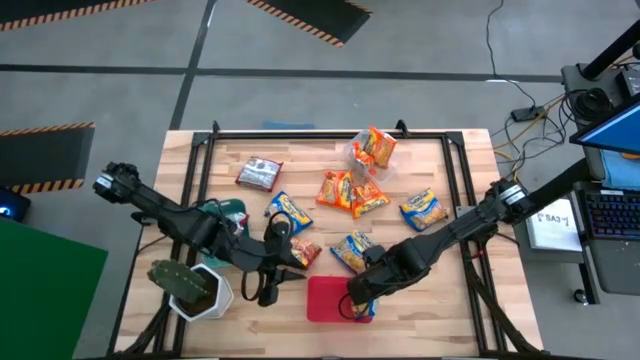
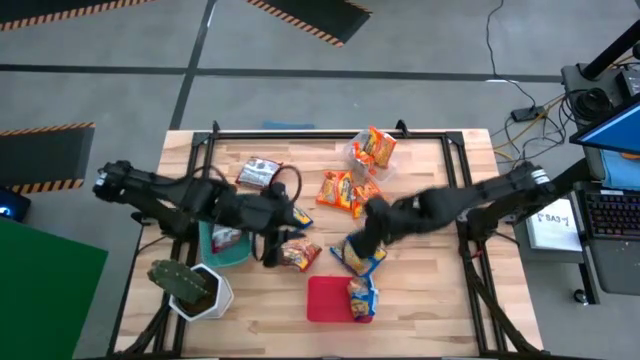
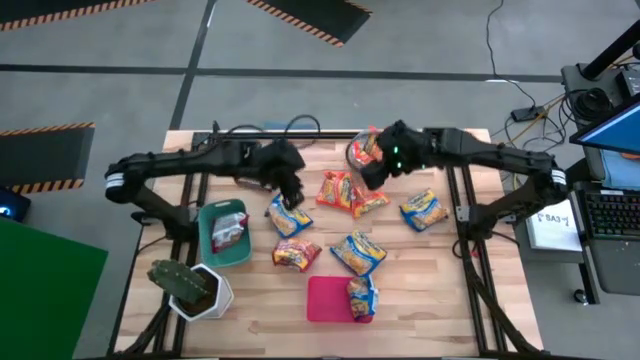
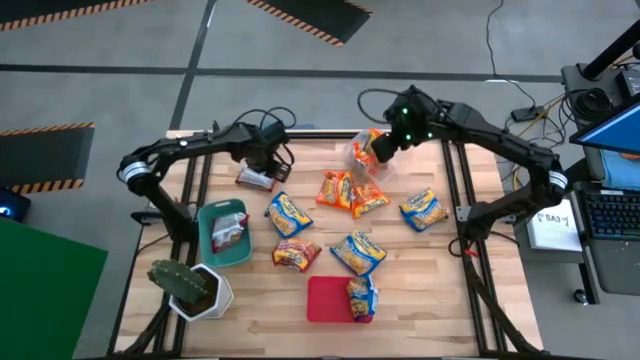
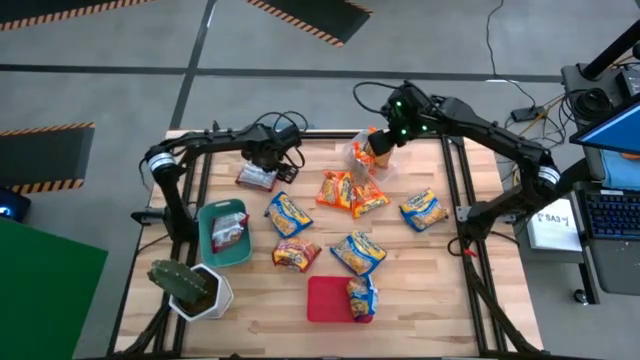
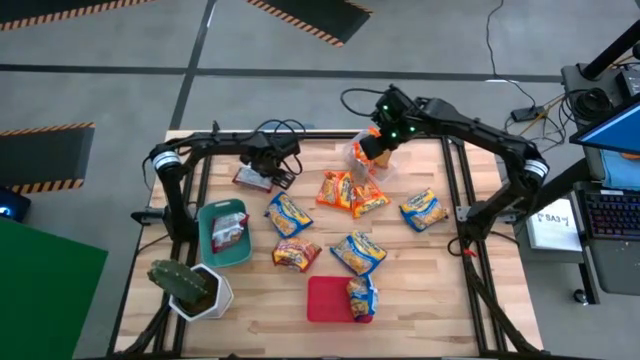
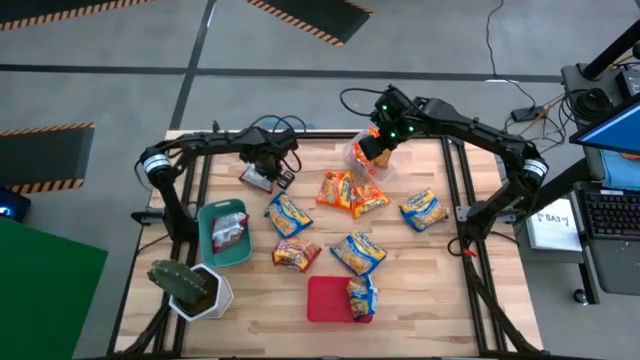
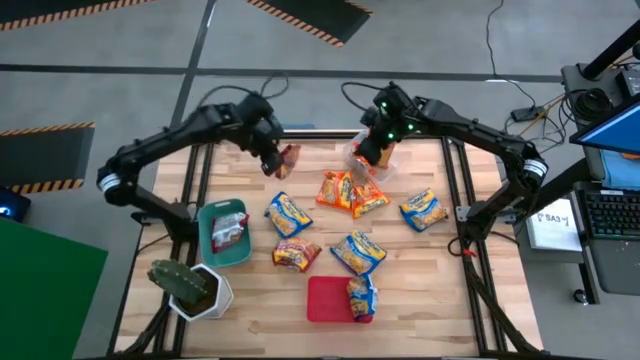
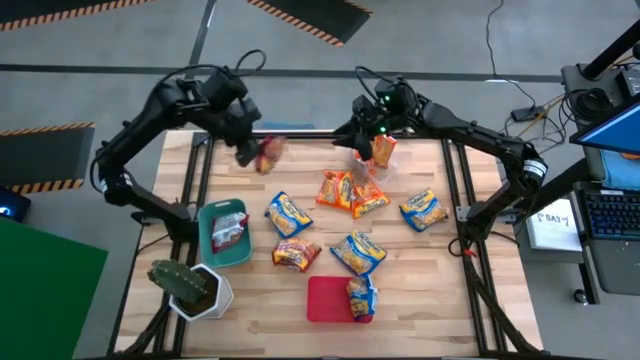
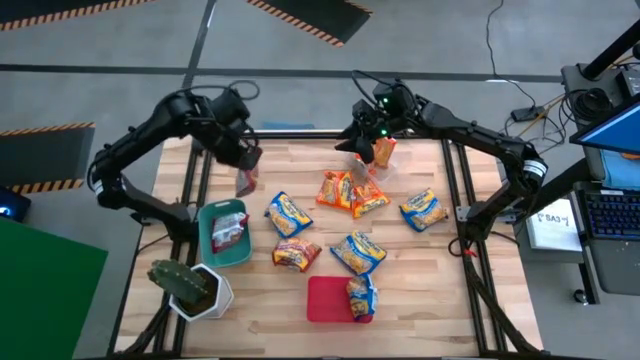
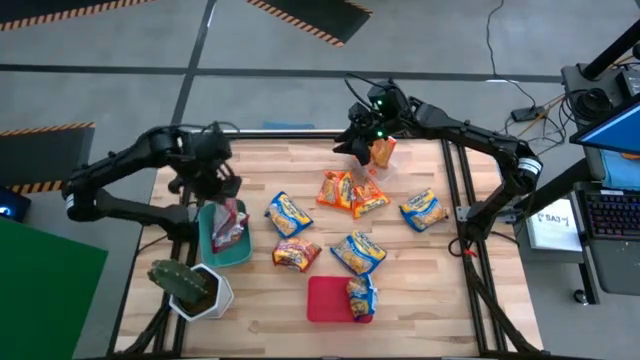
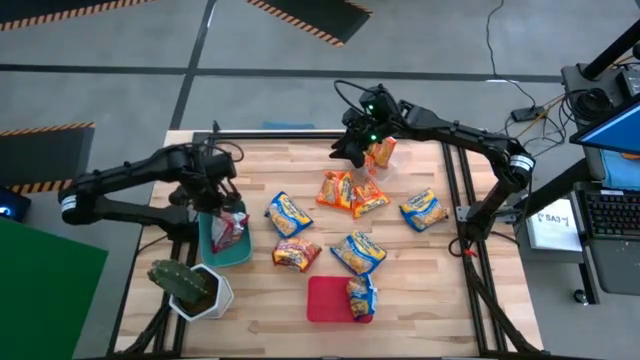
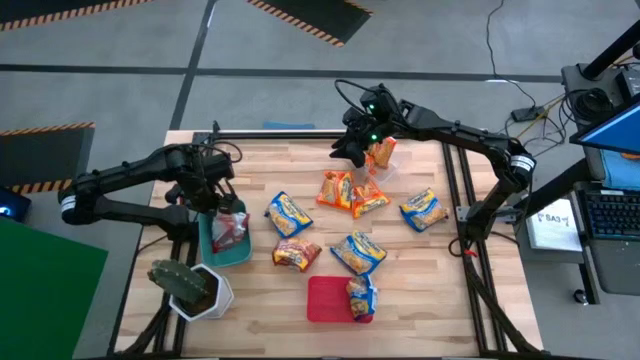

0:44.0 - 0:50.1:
Task: Sort Maruchan noodles
Put the top red noodle pack into the green bin

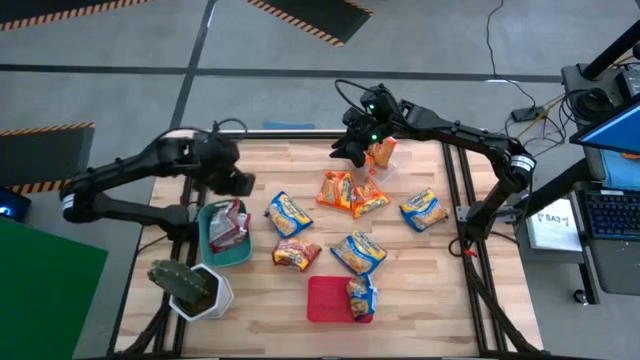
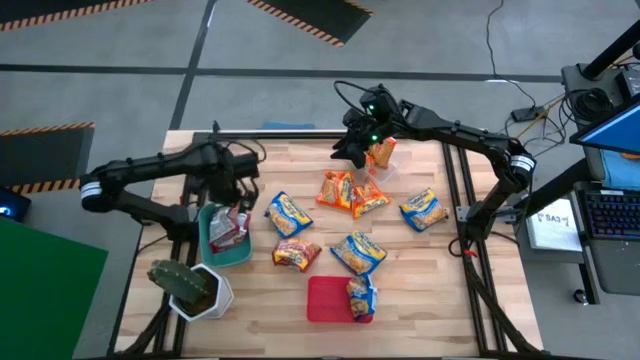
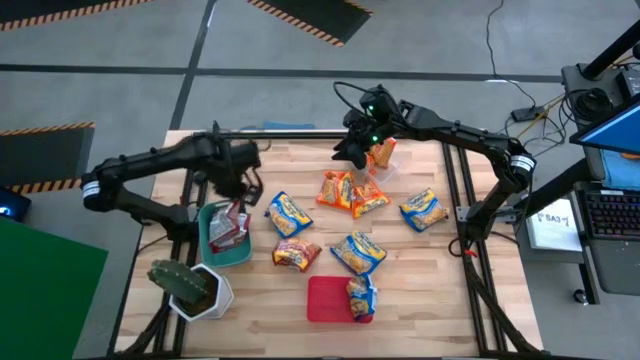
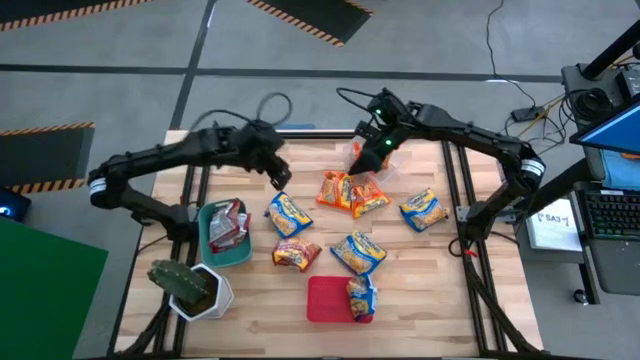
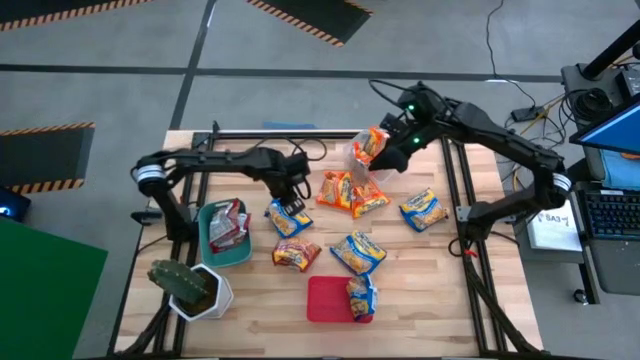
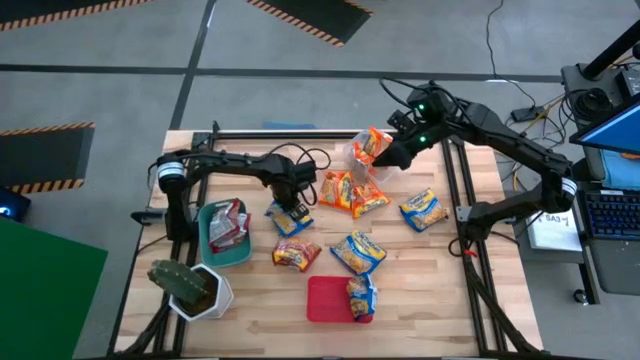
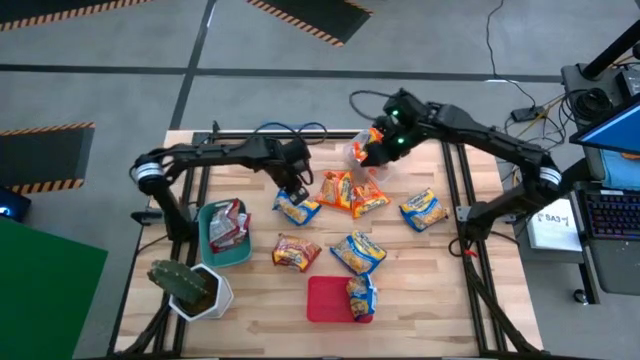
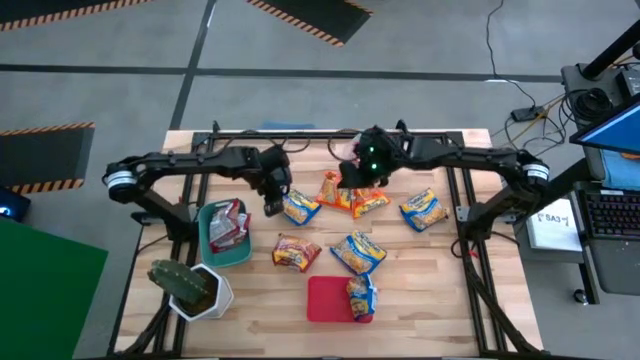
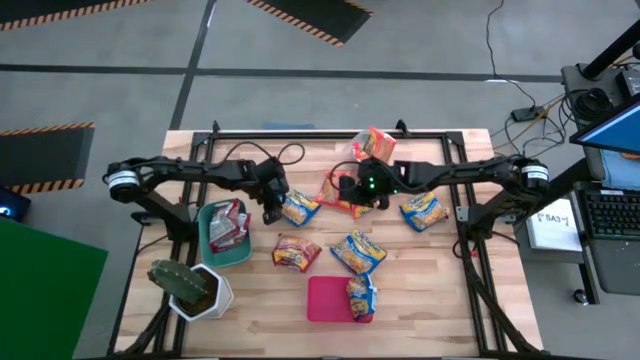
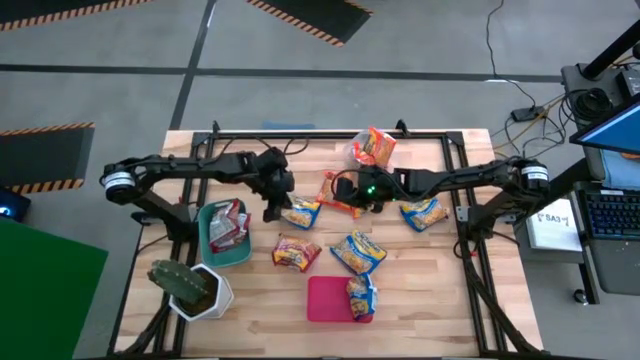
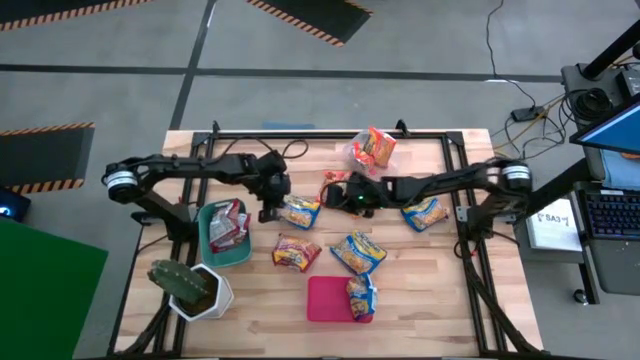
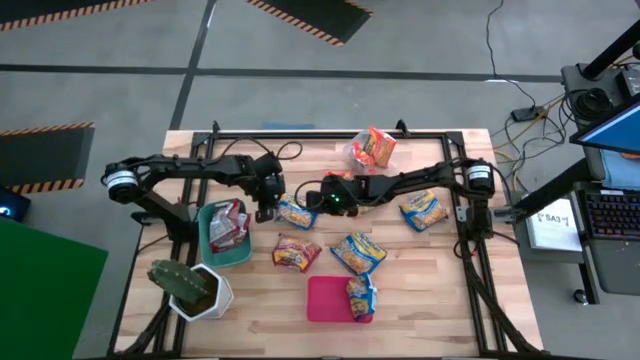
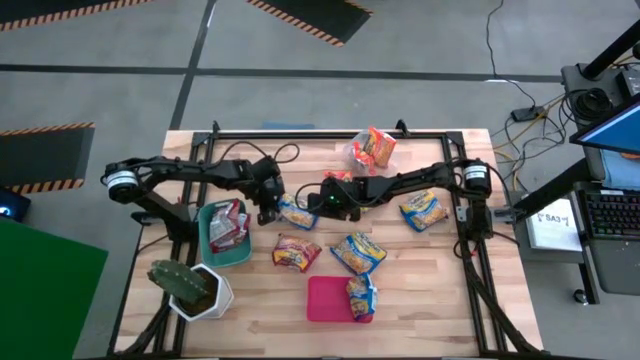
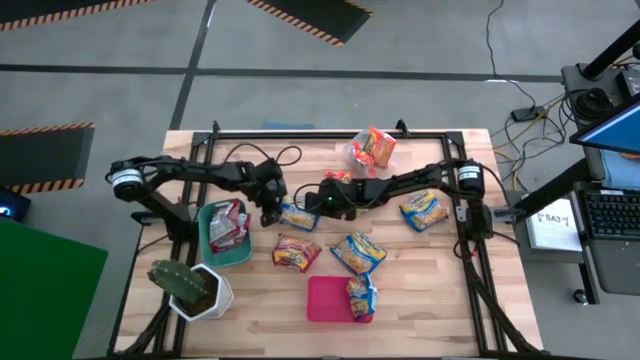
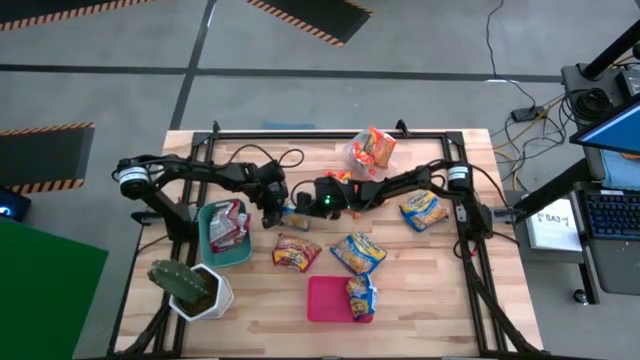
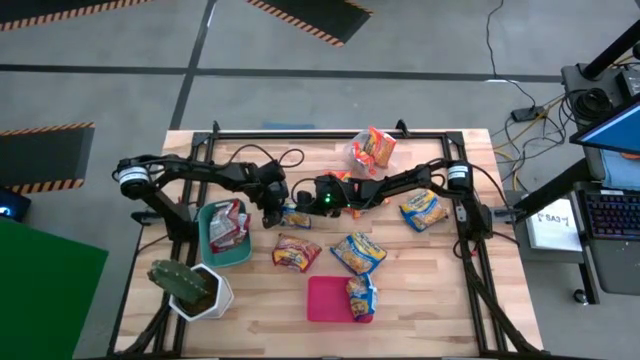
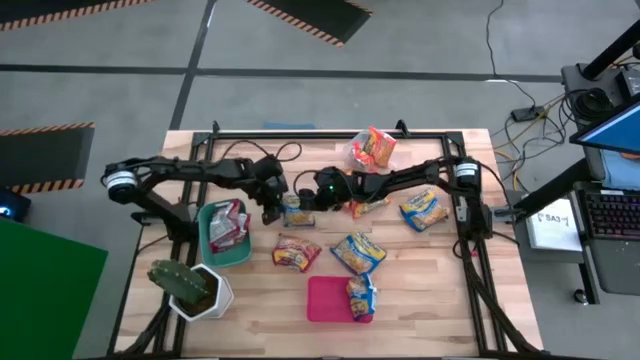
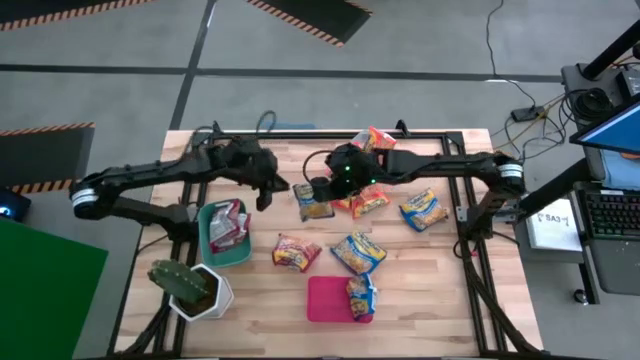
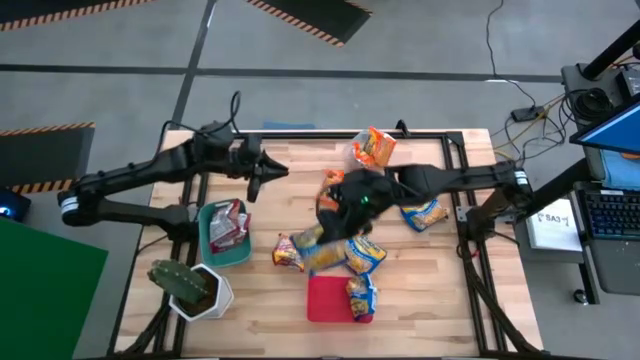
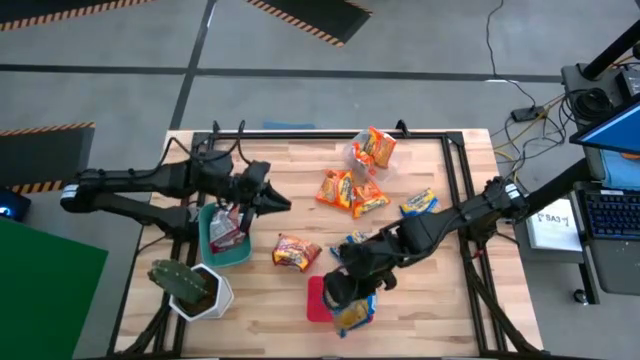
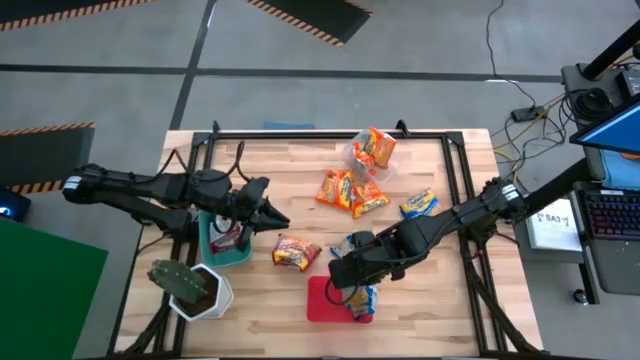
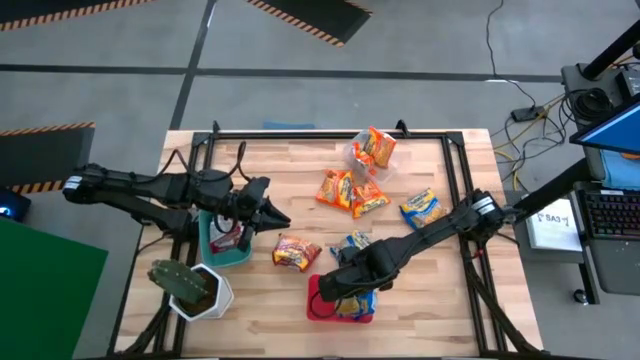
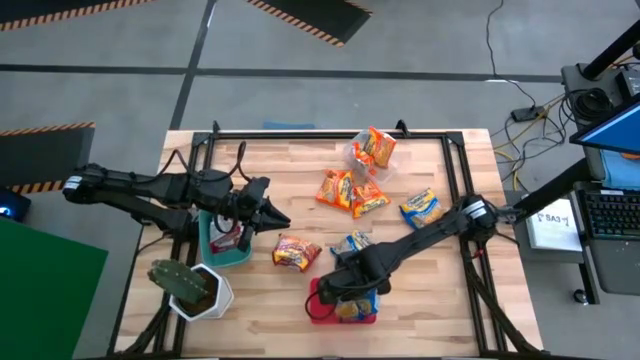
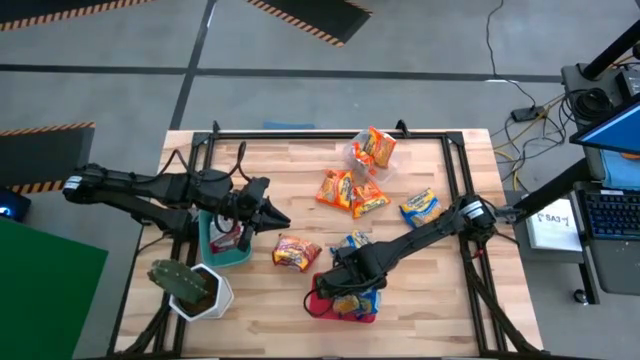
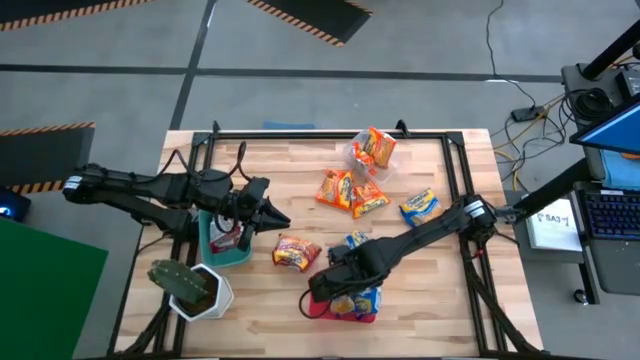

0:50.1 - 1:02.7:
Put the top left blue noodle pack into the red bin

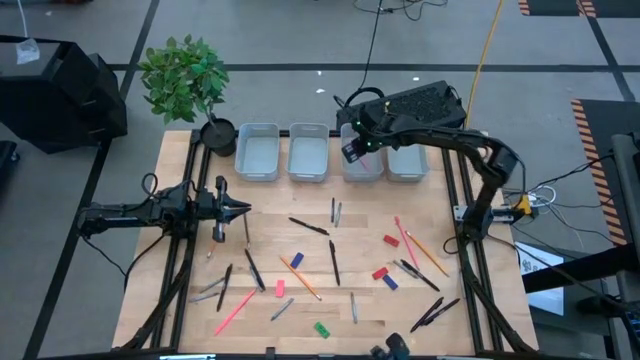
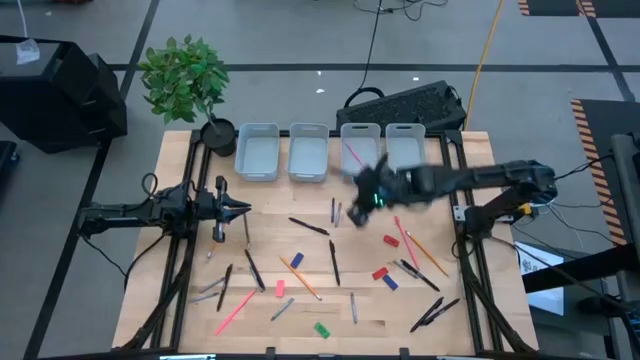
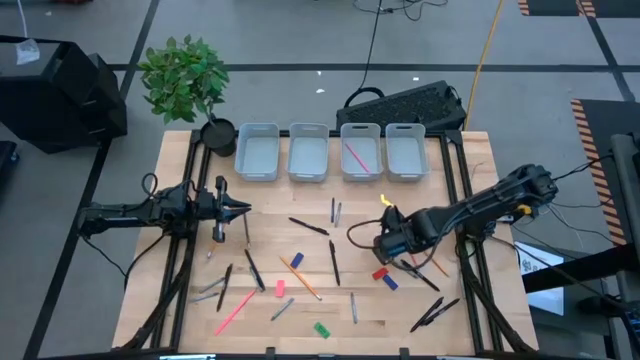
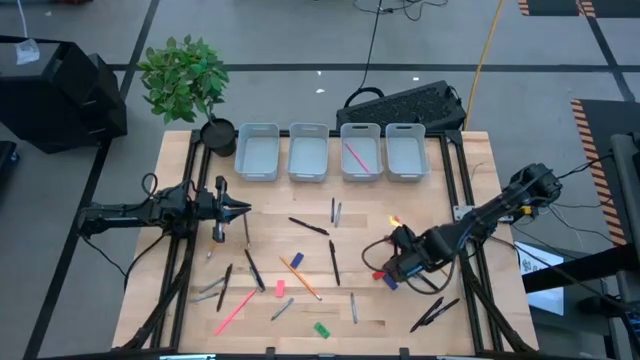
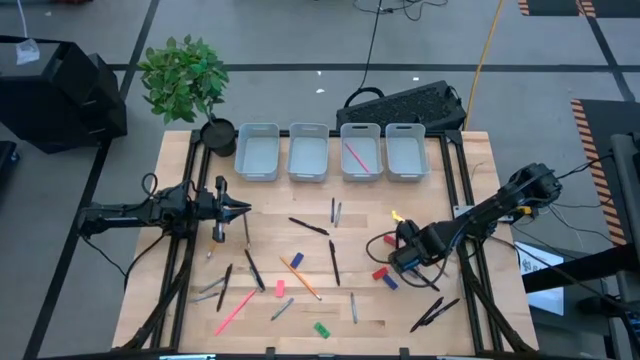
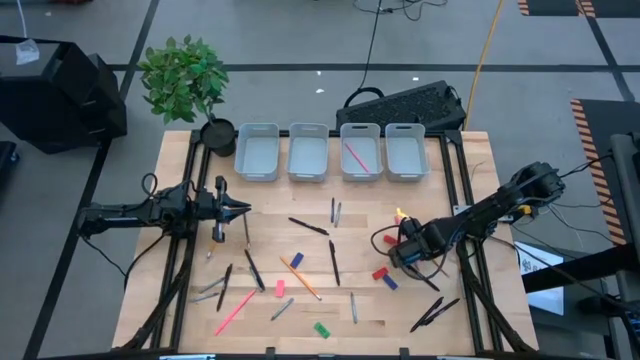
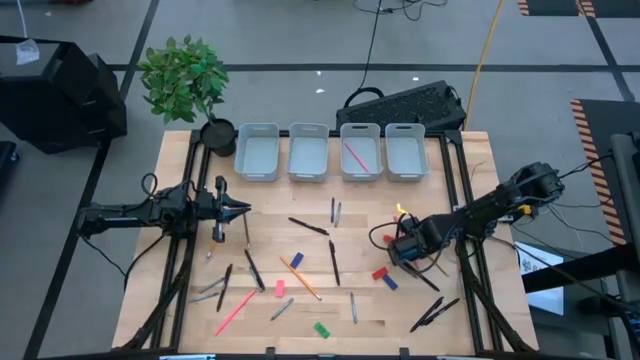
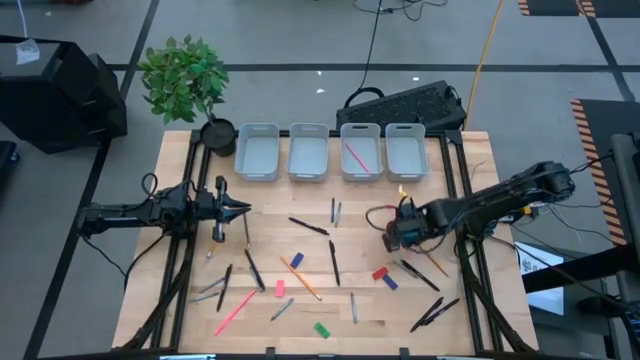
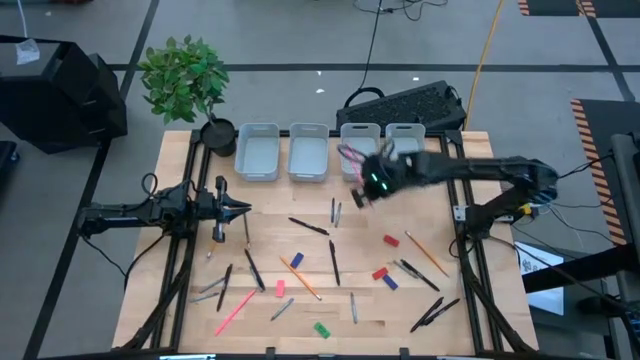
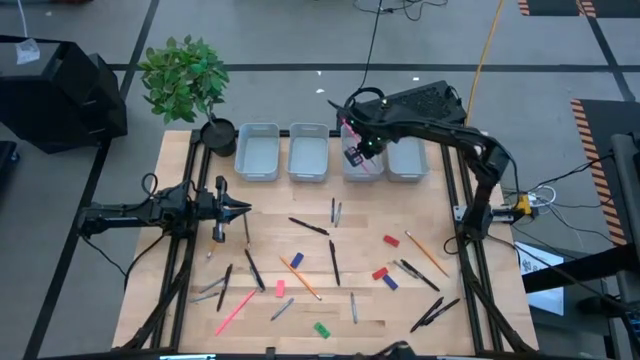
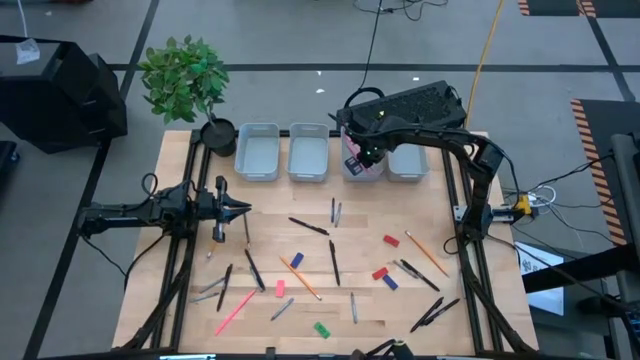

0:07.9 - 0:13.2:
Task: Sort crayons/erasers/pens/pencils in bins
Put the pink pencil into the middle right gray bin
